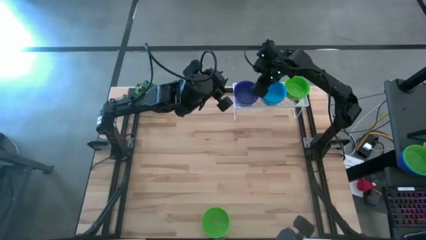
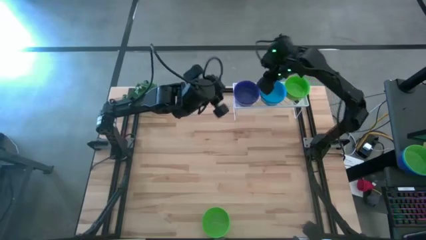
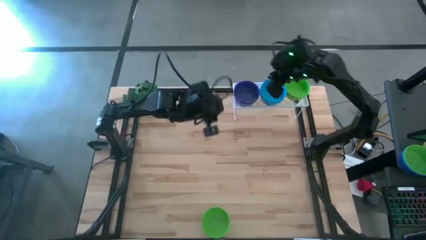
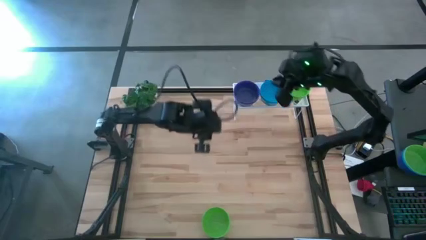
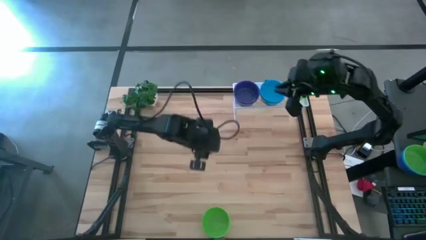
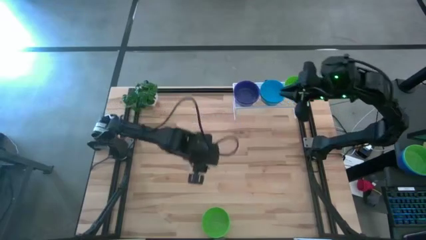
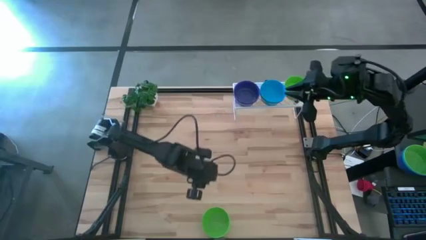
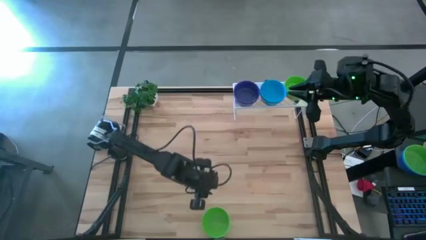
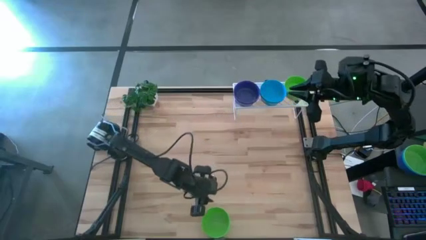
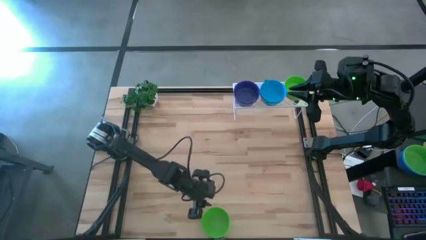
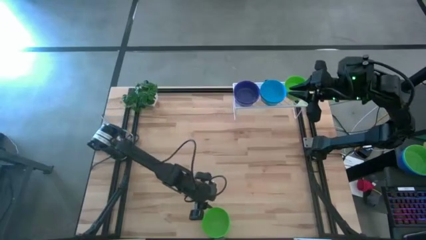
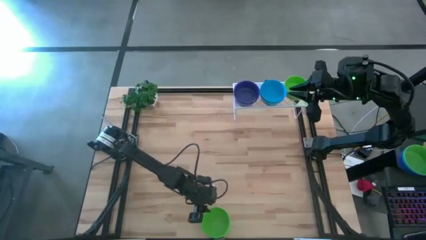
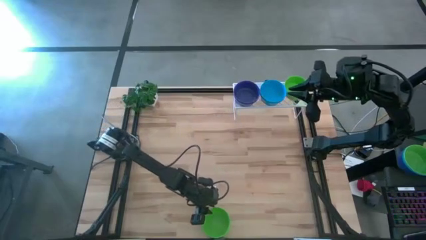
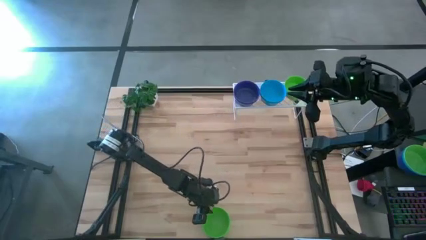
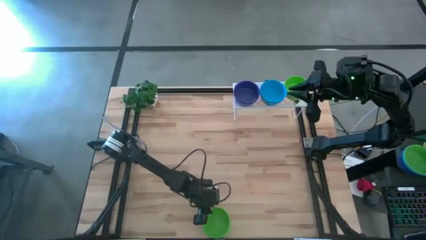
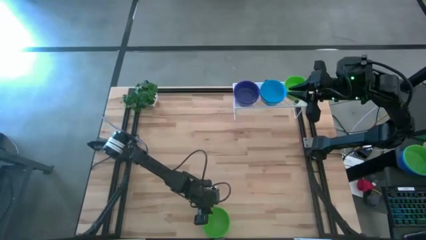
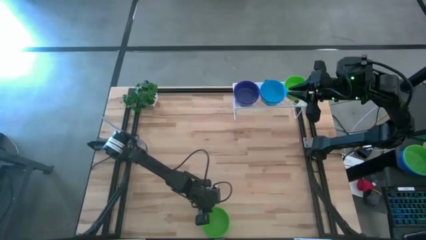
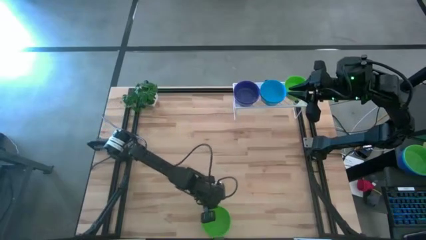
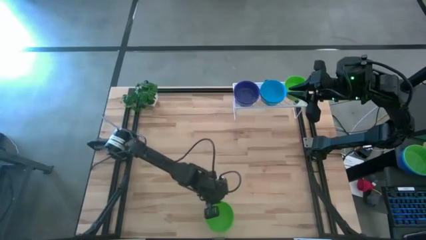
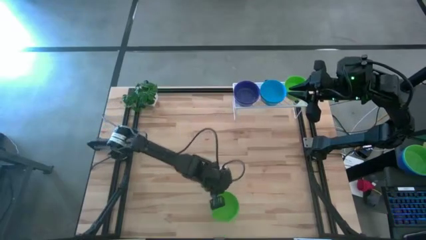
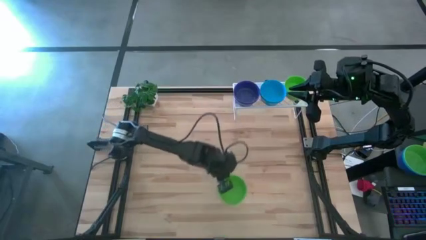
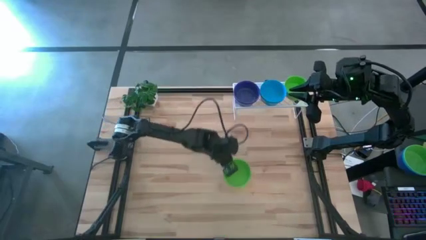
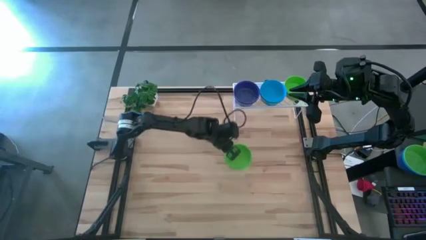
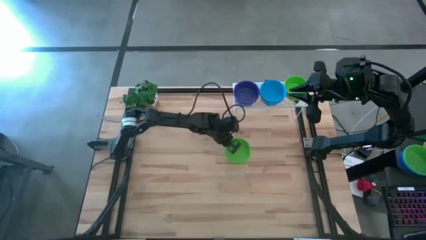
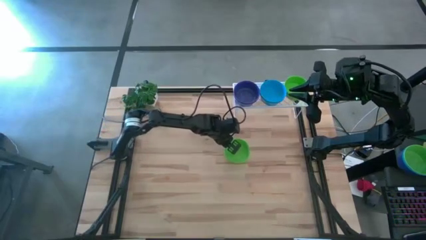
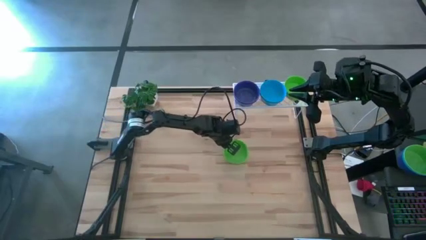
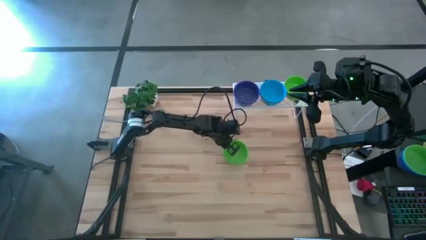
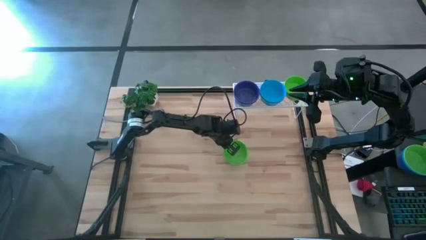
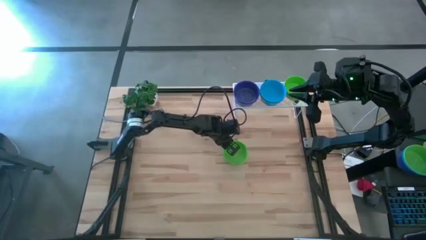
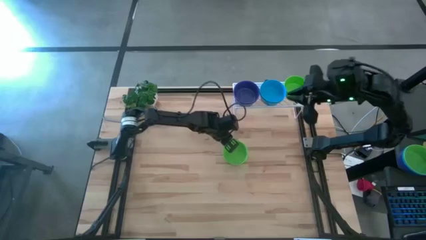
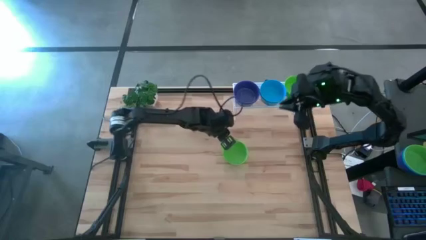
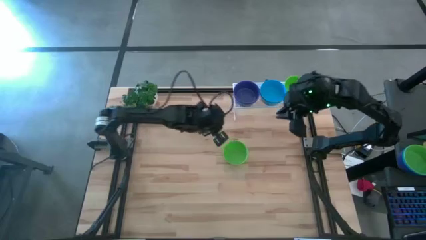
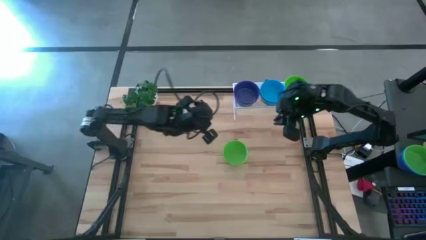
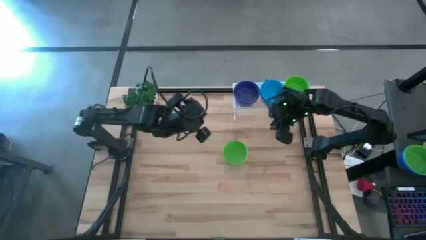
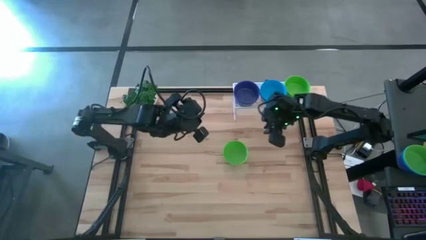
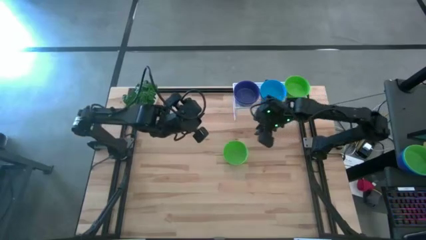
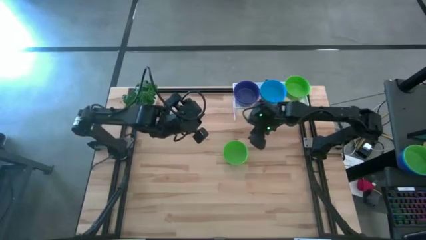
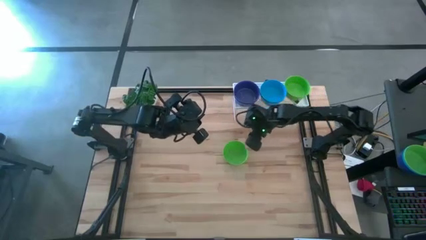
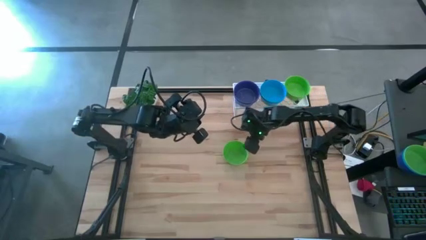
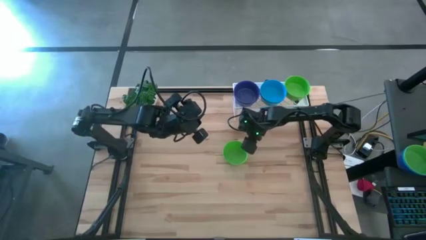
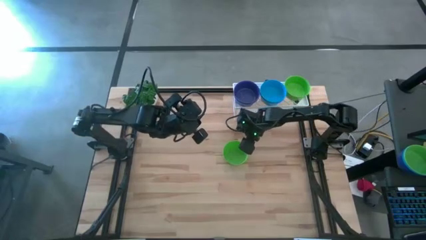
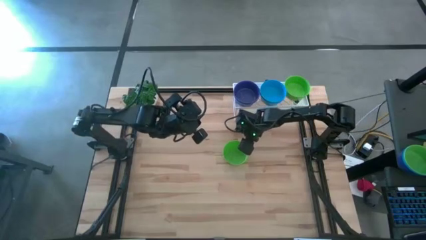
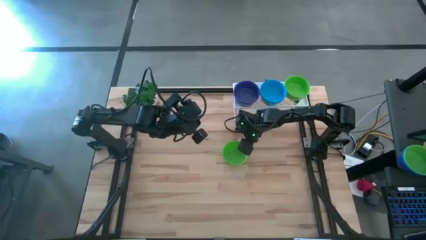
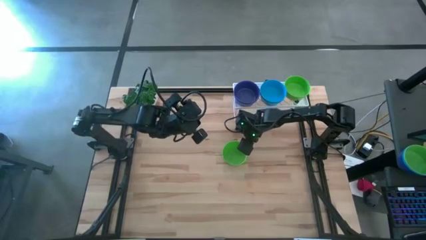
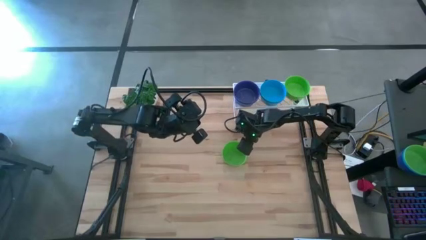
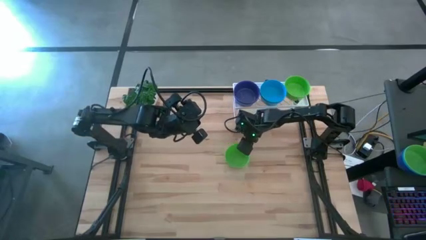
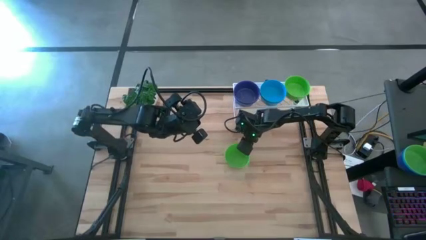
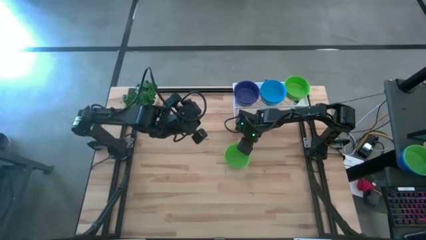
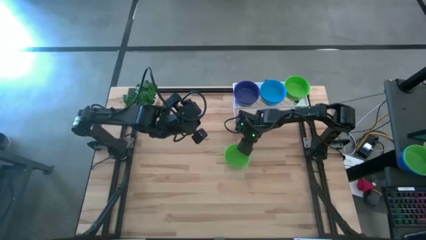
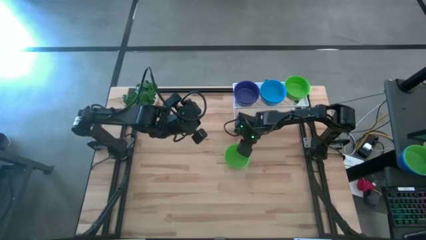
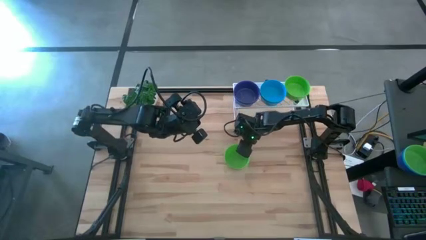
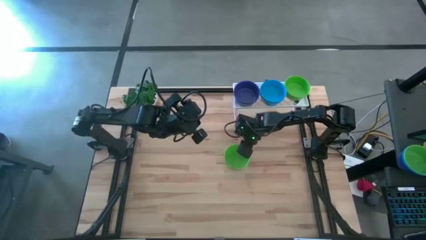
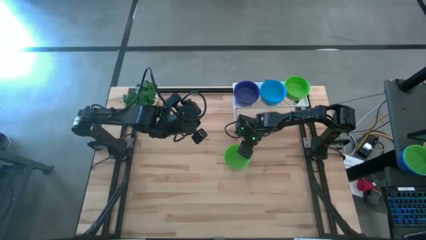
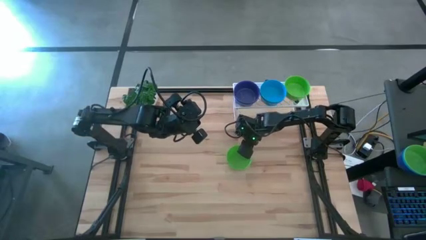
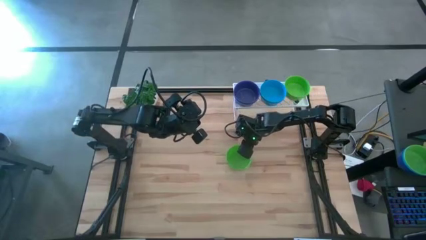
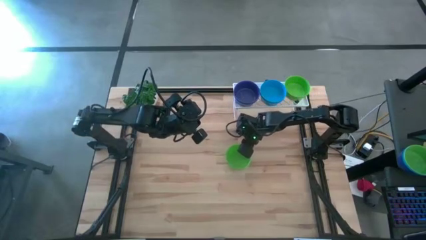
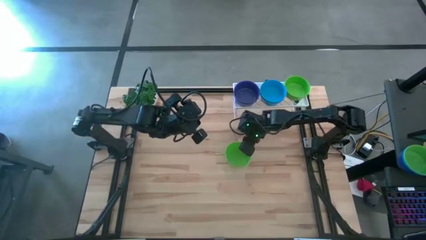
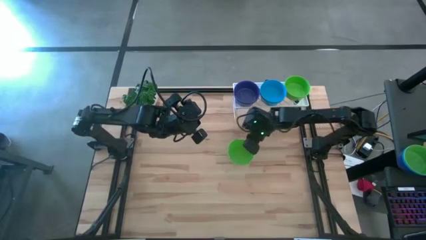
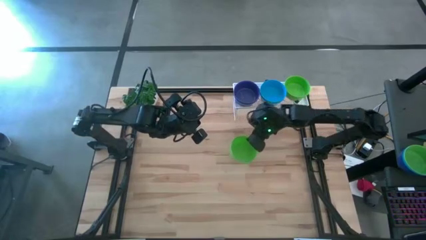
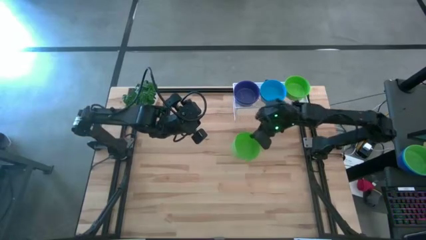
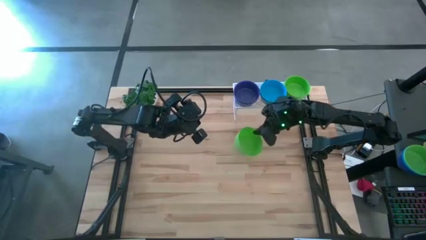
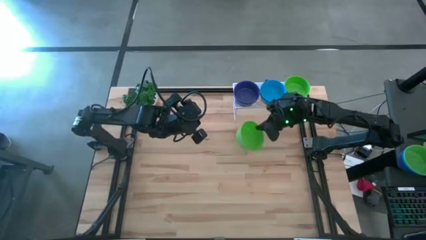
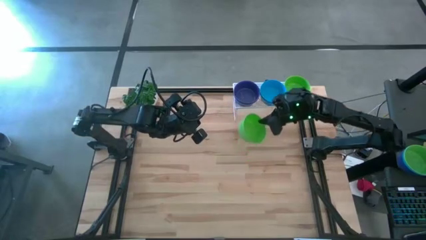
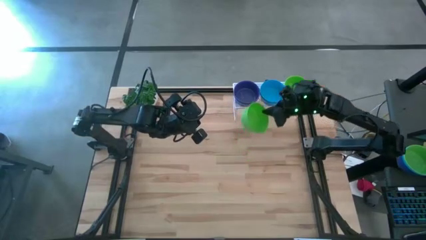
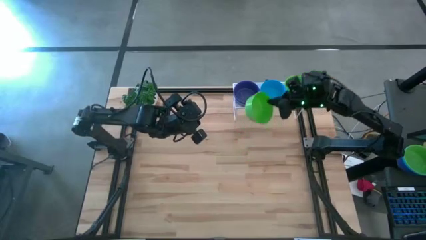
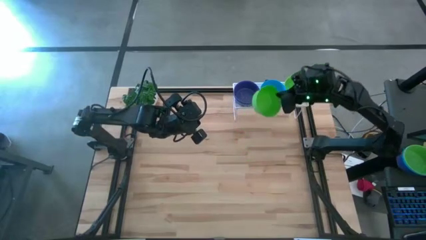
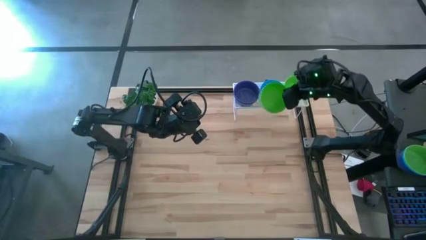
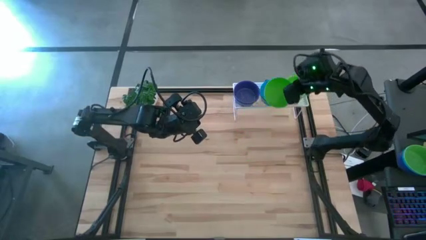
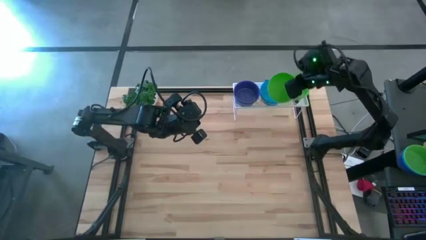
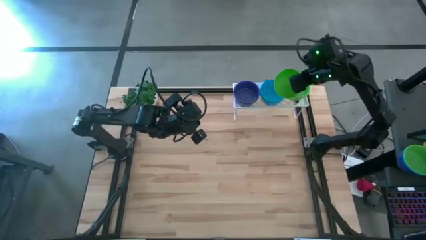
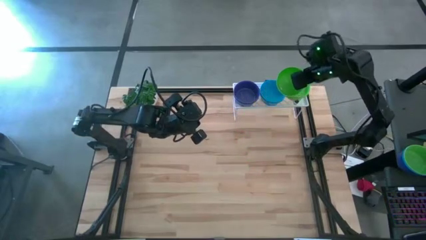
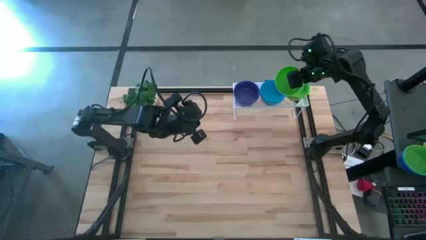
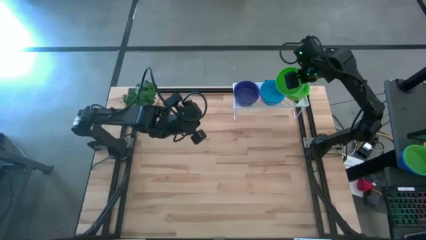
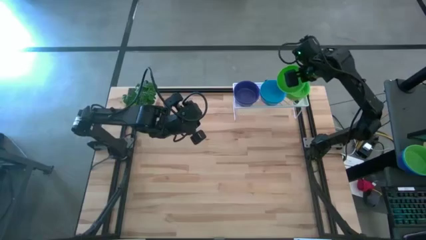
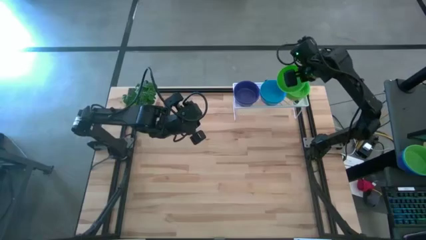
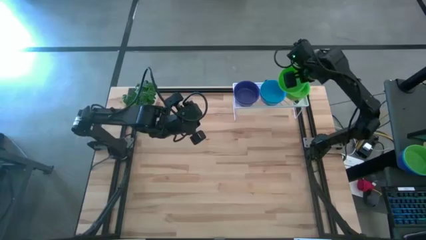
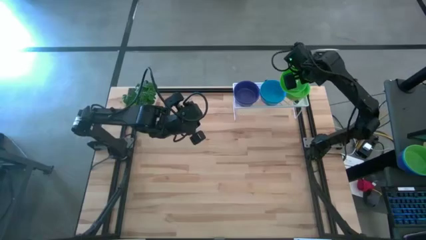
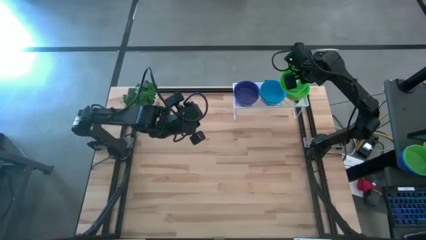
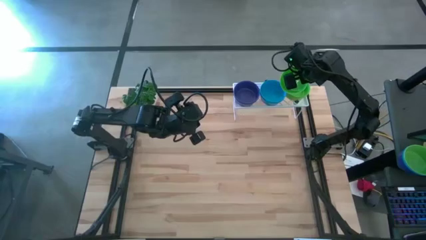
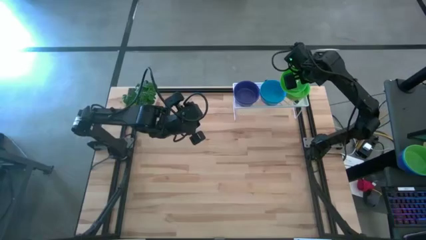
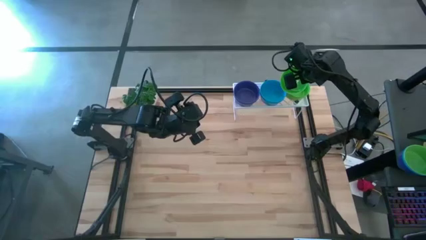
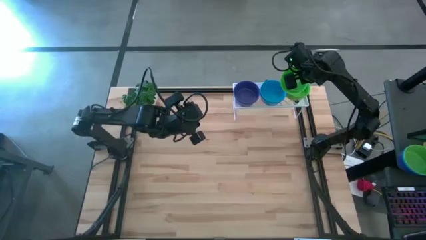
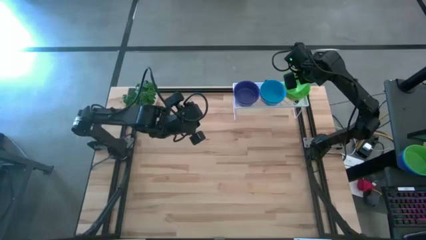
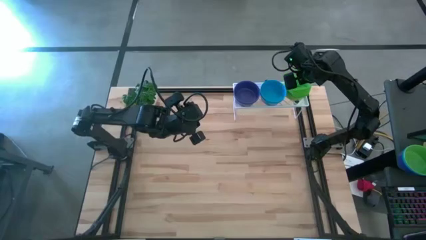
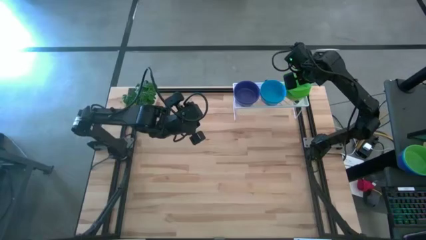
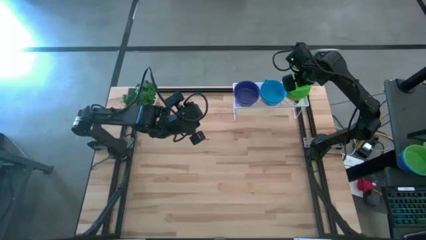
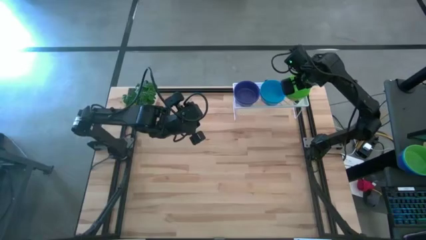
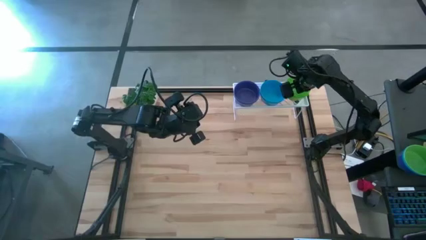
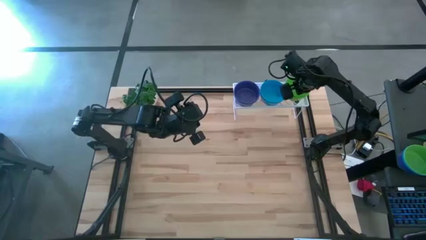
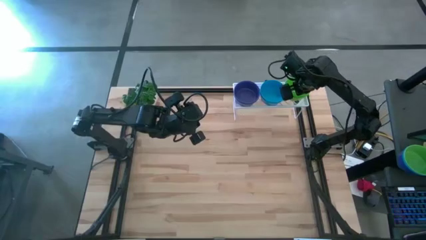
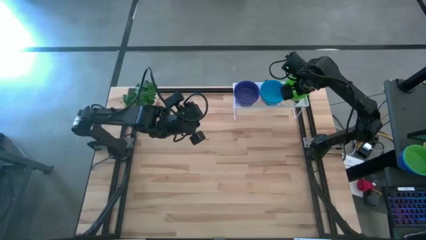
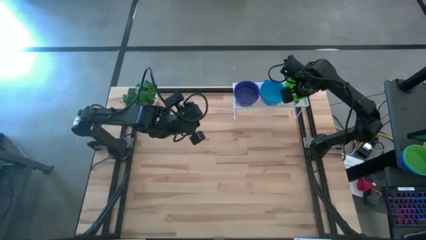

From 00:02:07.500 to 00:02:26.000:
Task: Pick & Place Mini bowls
Stack the green bowl on top of the green bowls on the shelf
